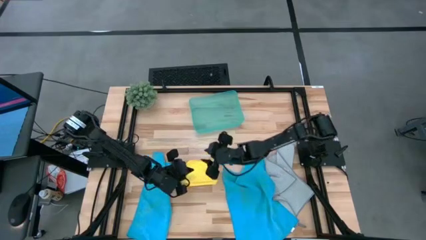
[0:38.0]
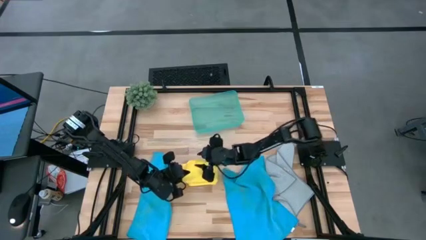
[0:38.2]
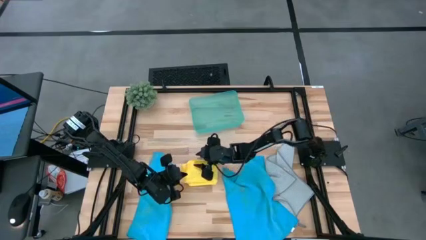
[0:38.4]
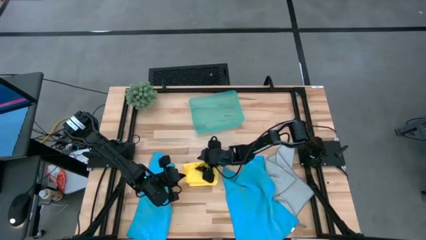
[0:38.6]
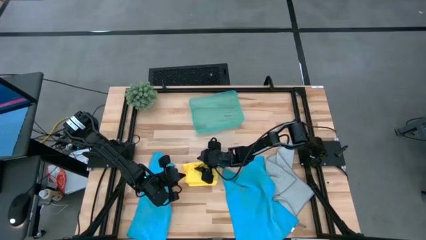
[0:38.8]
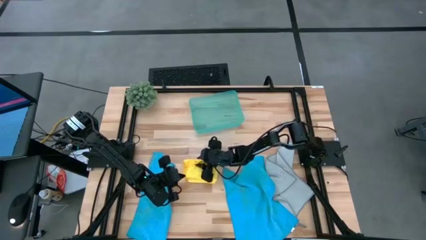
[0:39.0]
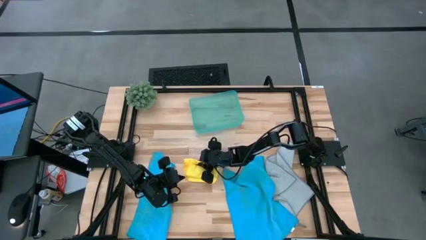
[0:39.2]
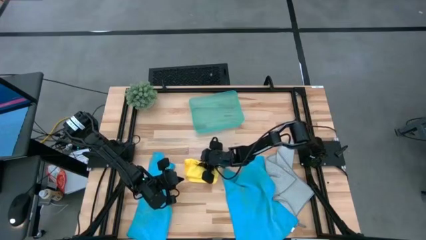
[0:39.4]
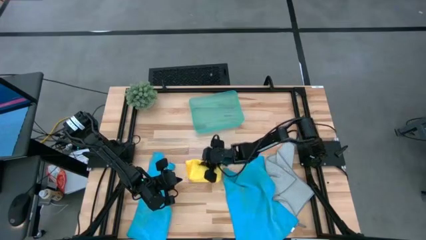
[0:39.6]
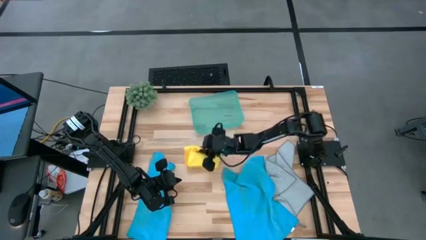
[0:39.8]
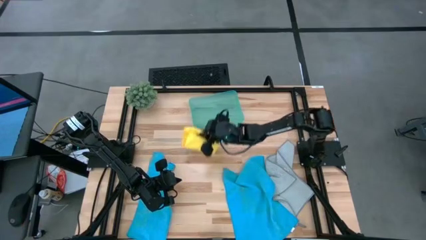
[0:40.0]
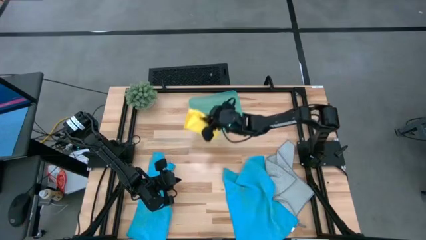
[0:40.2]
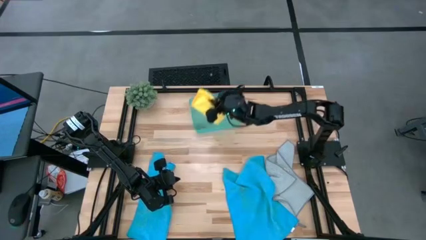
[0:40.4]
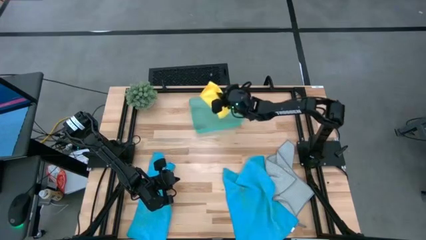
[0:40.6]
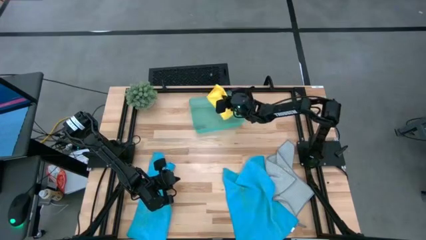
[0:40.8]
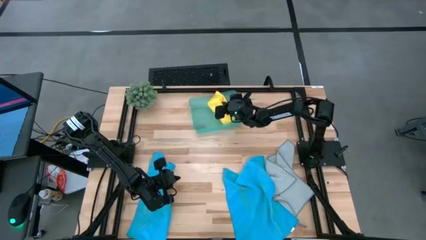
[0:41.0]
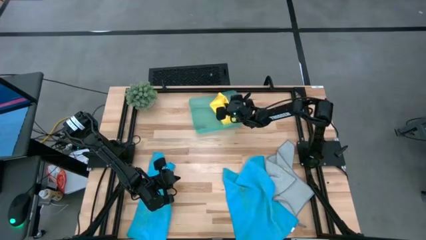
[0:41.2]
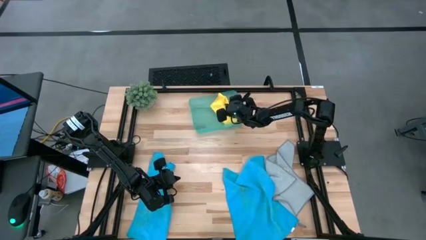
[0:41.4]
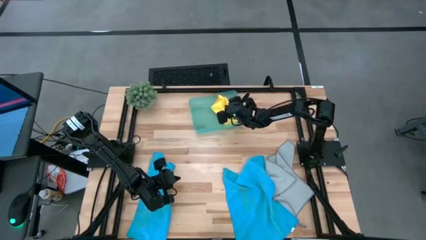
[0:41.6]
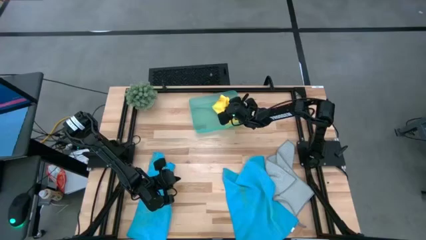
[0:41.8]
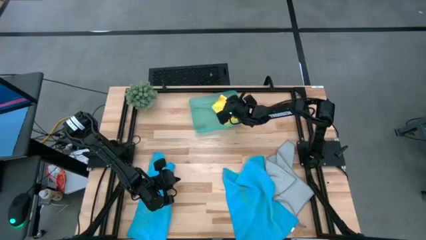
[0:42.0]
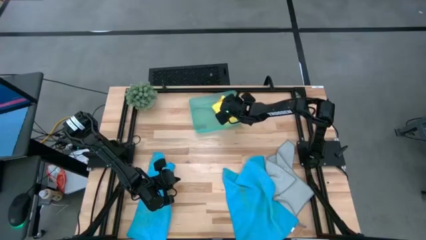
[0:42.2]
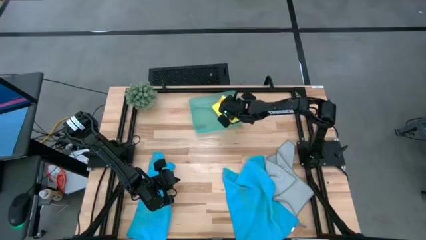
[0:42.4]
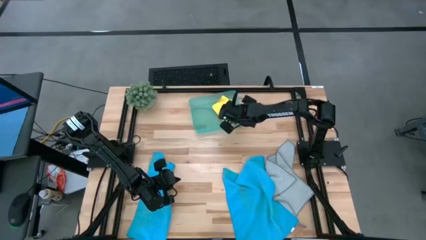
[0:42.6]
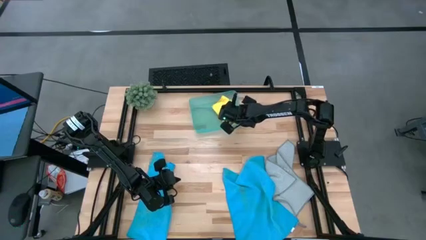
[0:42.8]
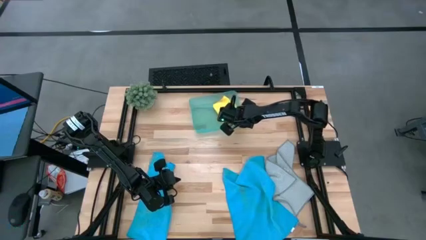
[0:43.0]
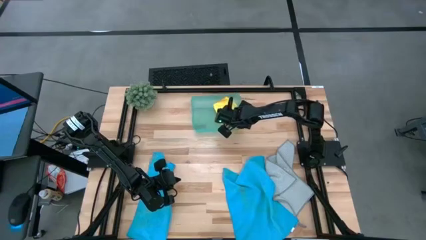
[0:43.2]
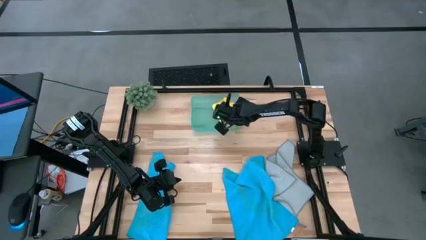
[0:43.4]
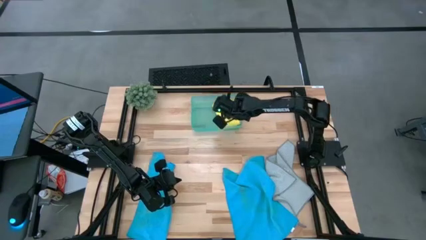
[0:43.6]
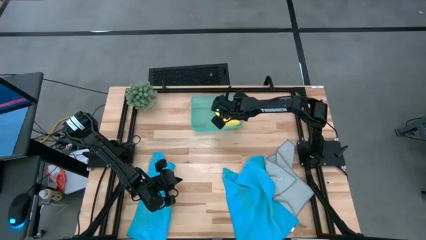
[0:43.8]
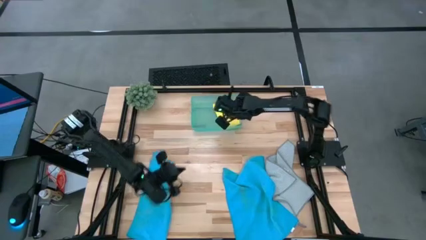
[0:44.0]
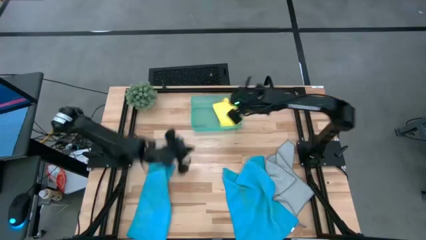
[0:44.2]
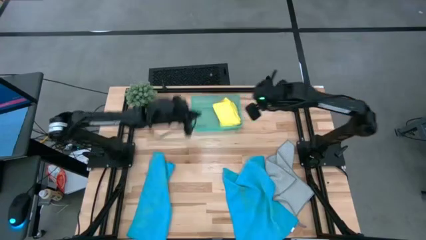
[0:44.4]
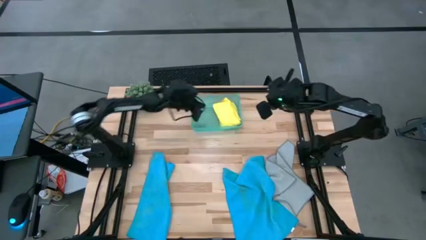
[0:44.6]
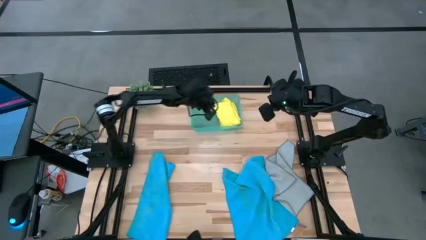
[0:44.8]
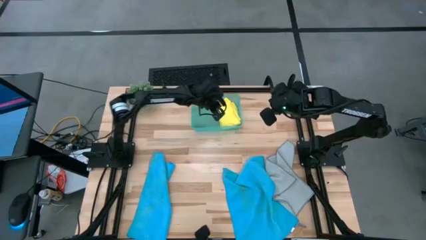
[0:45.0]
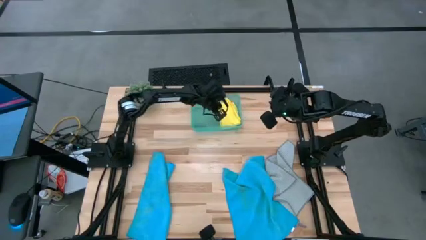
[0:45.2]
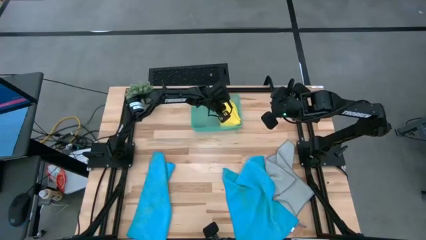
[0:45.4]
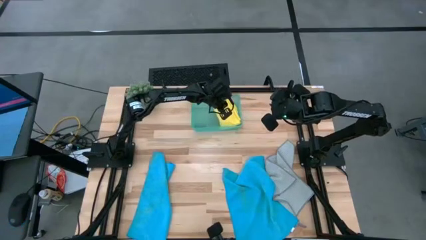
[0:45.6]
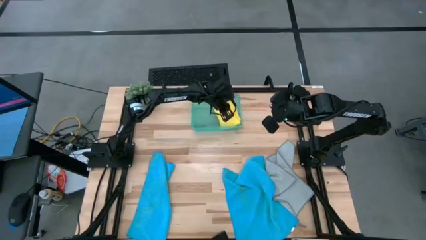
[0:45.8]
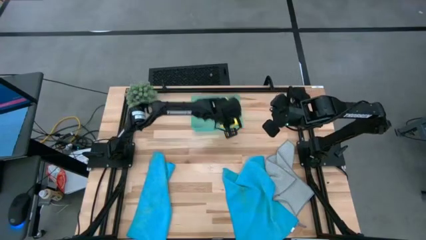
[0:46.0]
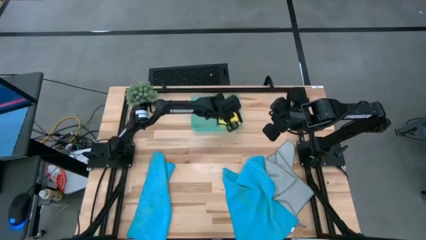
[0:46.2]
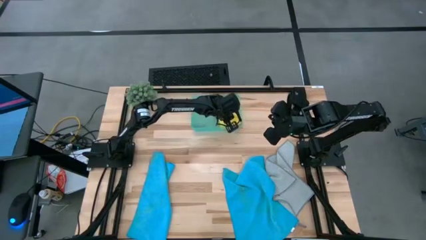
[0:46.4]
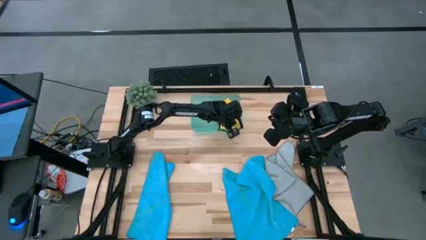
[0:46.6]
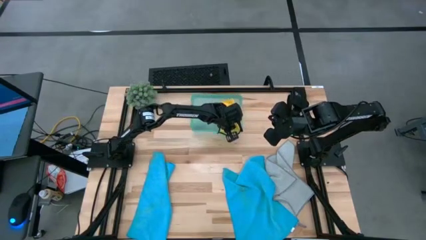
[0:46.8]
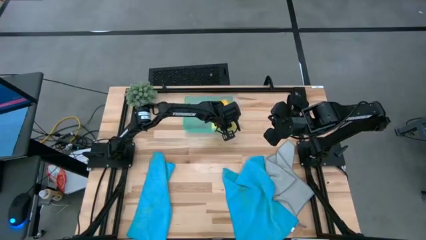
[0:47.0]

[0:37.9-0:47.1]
Task: Fold microfiber towels
Put the yellow microfiber towel into the bin

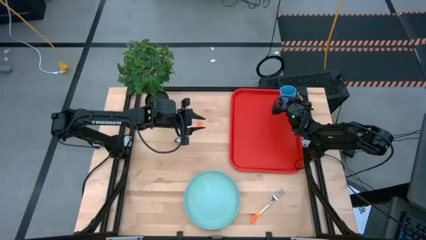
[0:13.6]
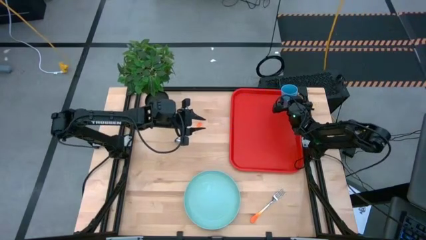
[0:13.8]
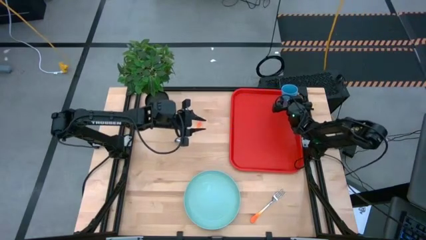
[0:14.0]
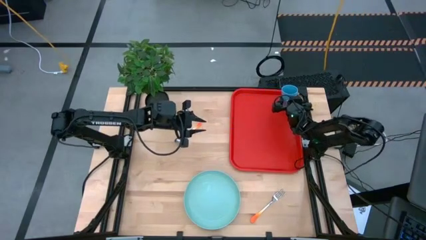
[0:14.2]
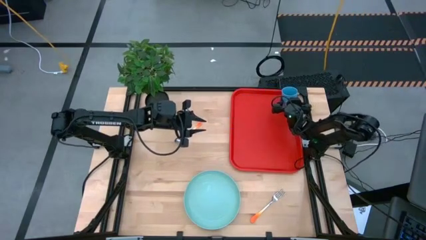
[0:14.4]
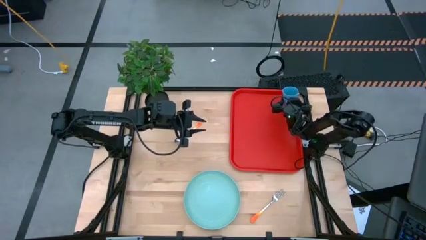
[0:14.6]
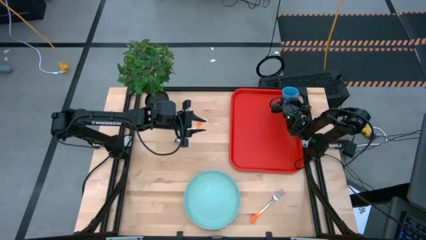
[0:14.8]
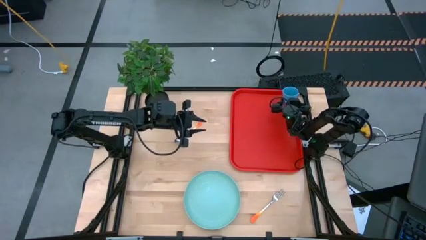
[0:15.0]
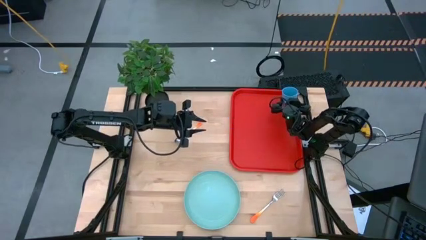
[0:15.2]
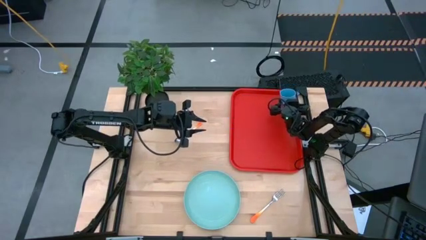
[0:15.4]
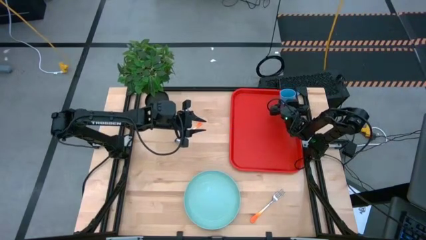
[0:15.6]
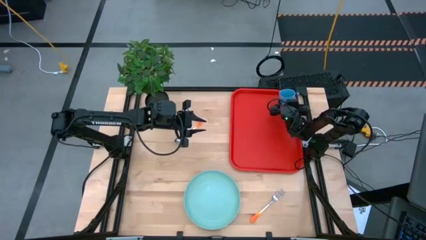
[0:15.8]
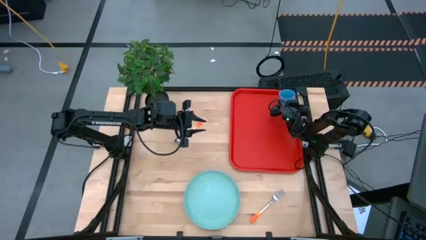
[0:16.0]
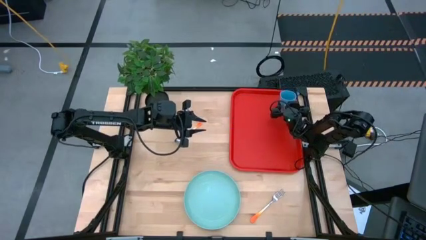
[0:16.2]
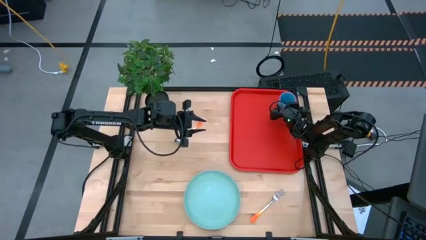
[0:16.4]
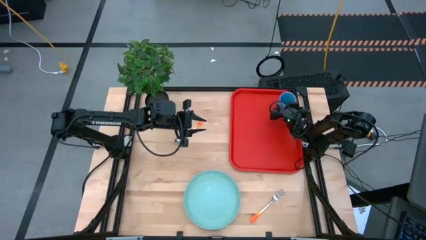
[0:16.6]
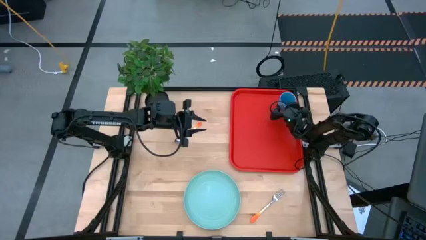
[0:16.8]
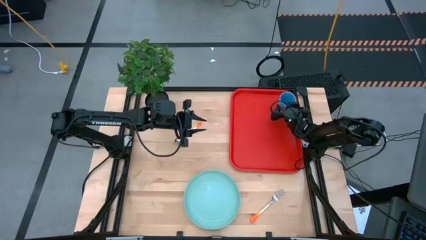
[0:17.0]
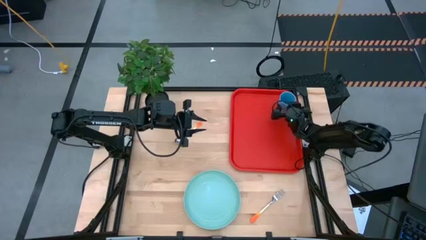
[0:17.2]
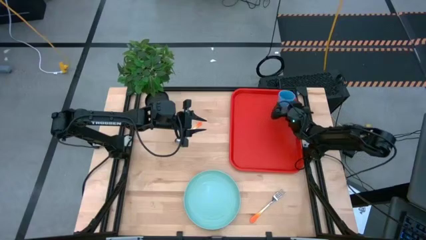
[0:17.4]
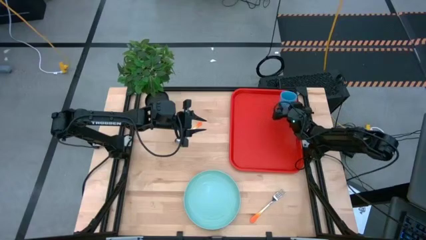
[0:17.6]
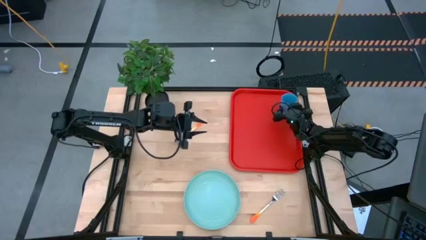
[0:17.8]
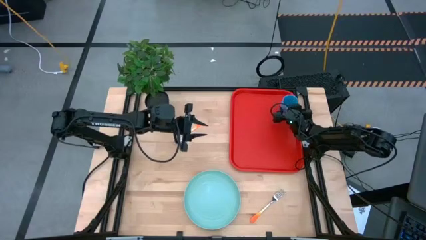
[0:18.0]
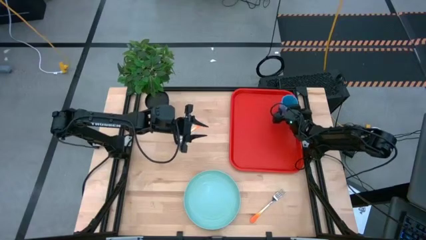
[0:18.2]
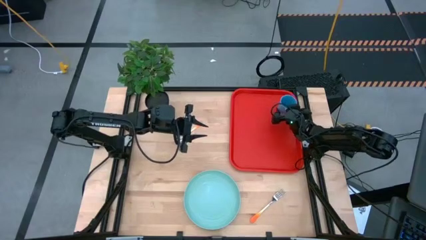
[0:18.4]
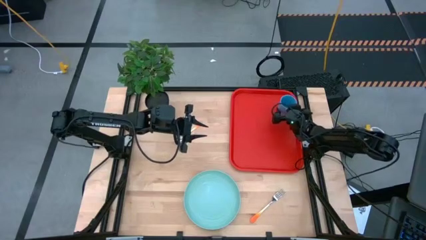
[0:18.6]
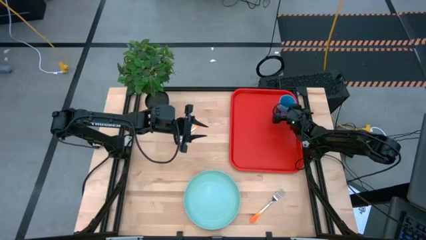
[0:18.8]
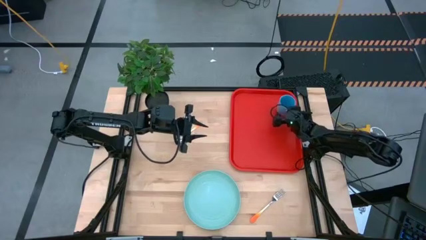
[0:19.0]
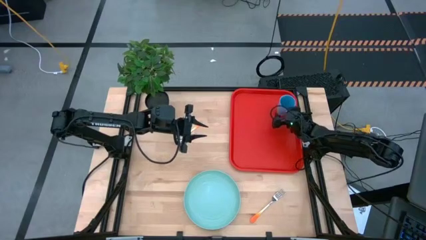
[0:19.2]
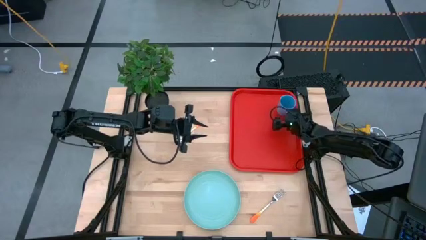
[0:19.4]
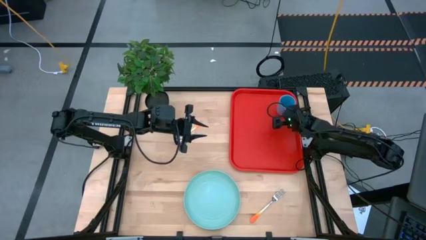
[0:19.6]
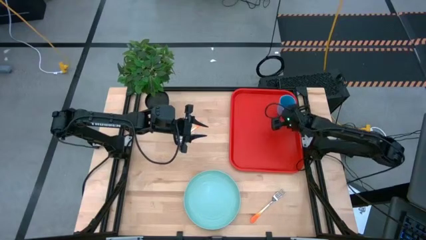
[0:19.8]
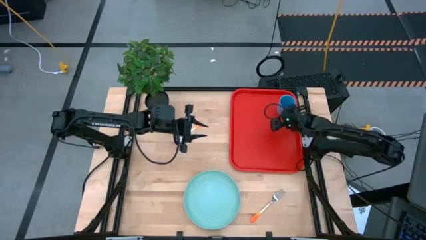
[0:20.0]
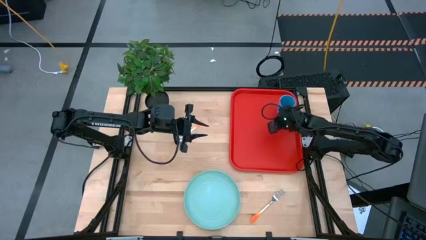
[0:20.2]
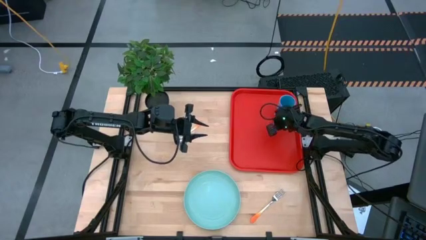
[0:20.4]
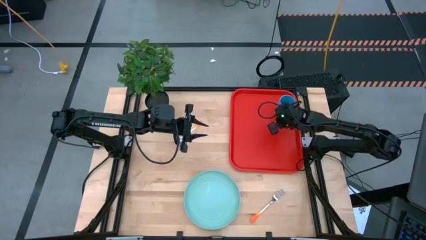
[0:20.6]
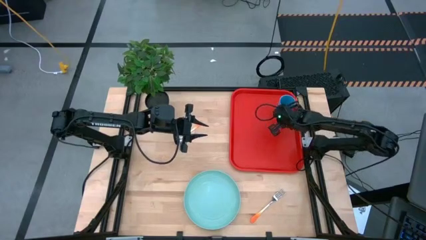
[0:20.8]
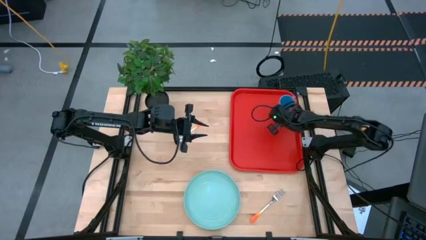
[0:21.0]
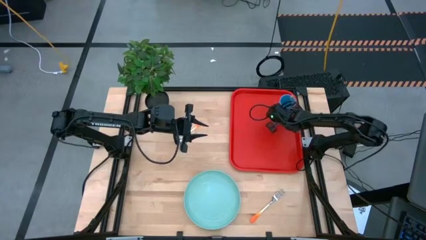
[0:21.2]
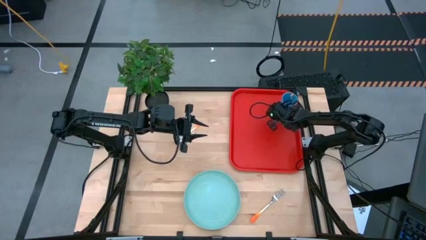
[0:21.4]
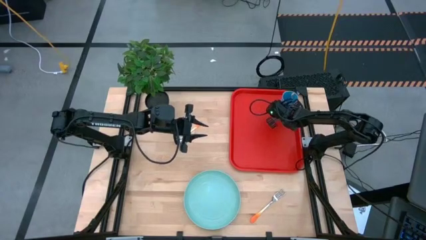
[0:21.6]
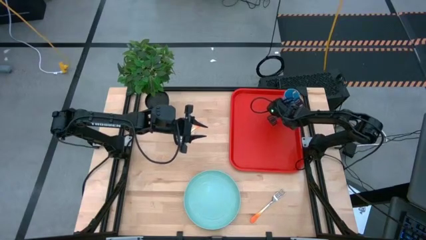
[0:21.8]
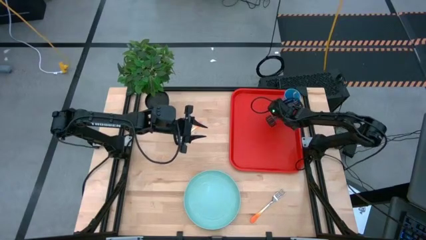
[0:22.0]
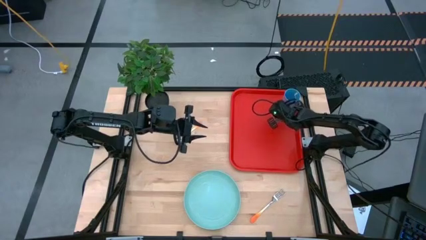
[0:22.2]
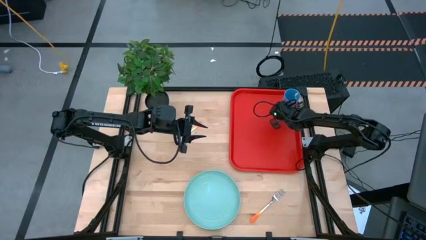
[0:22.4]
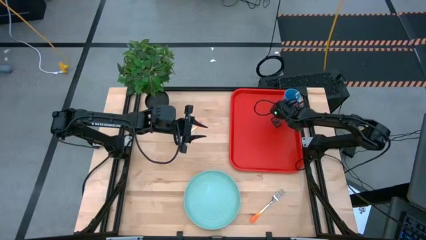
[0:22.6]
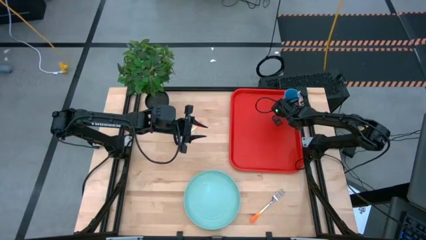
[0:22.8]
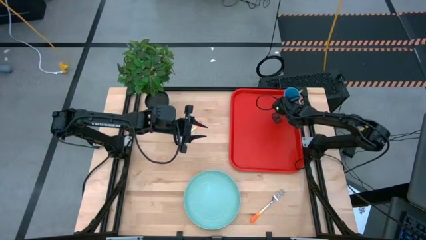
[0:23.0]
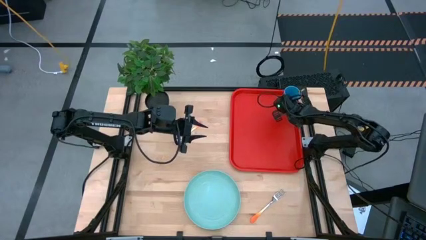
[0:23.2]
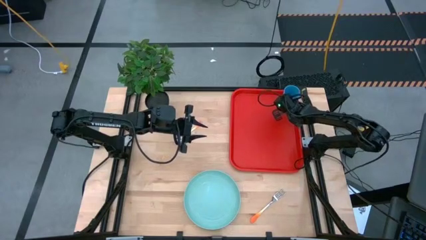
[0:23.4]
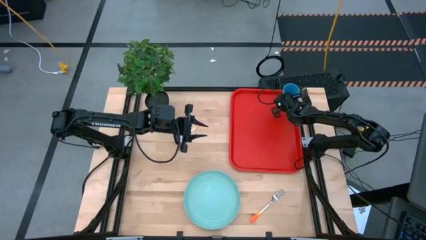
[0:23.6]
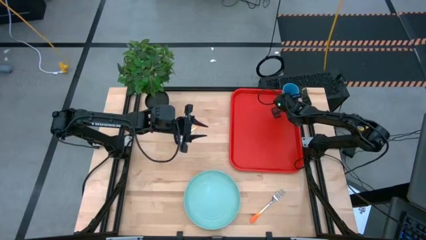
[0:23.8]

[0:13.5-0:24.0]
Task: Pick and place plate/cup/fork/spoon on tray
Put the blue cup on the red tray
